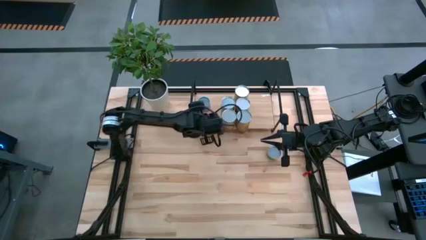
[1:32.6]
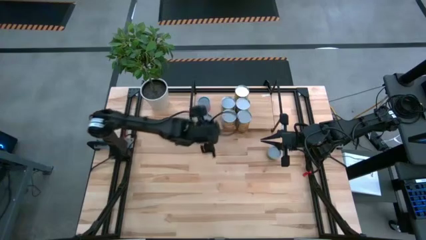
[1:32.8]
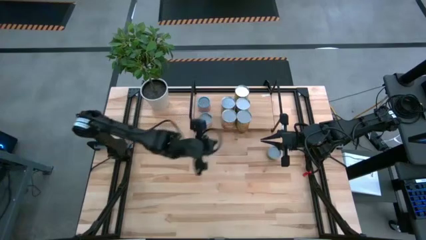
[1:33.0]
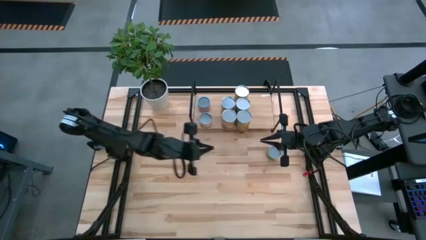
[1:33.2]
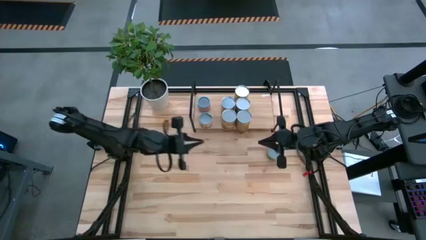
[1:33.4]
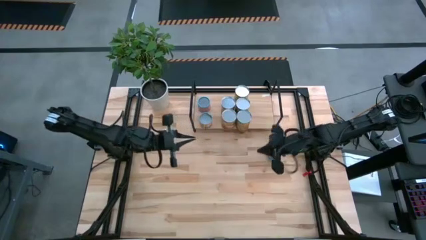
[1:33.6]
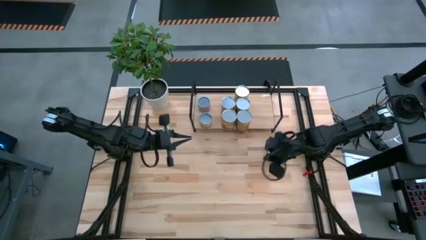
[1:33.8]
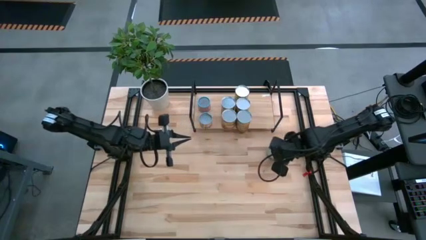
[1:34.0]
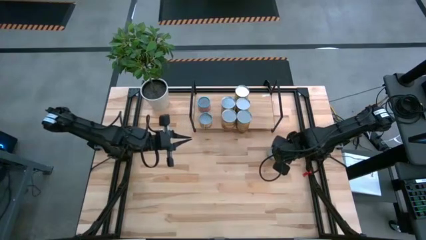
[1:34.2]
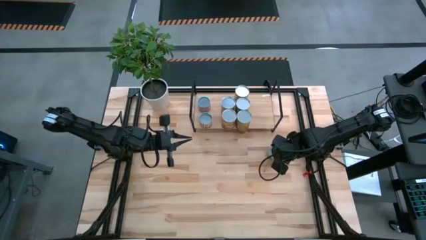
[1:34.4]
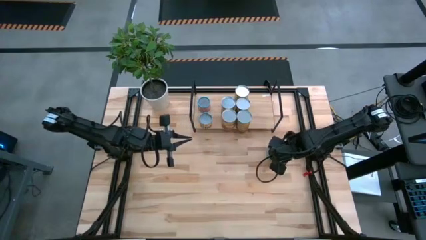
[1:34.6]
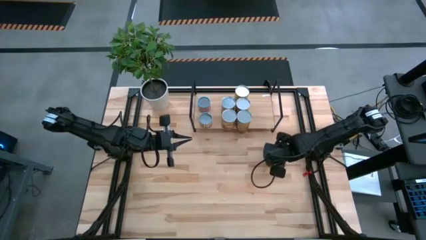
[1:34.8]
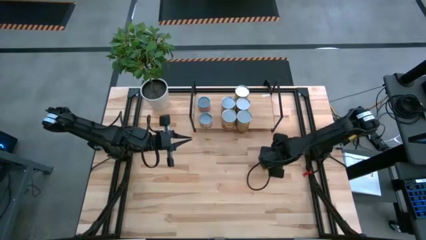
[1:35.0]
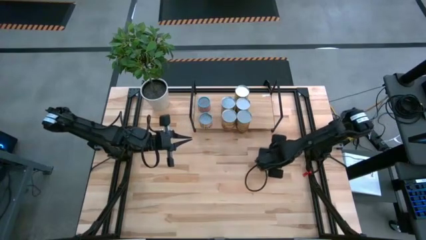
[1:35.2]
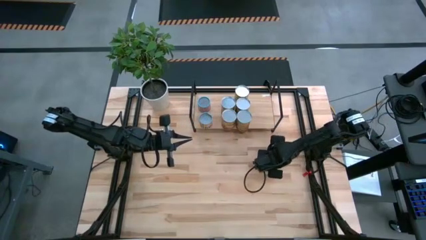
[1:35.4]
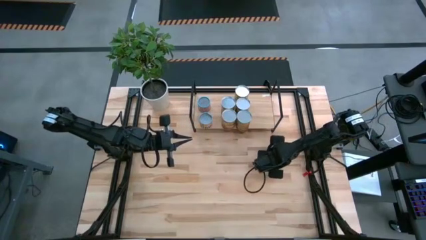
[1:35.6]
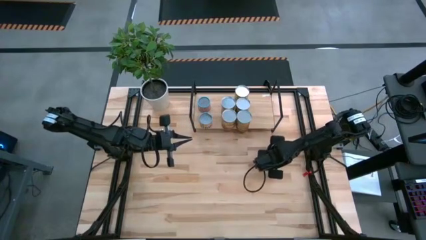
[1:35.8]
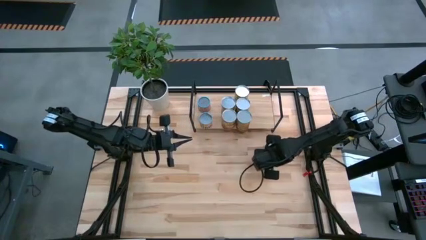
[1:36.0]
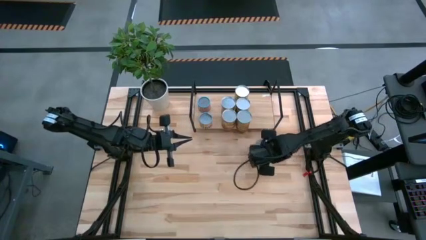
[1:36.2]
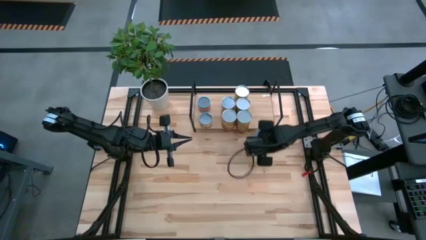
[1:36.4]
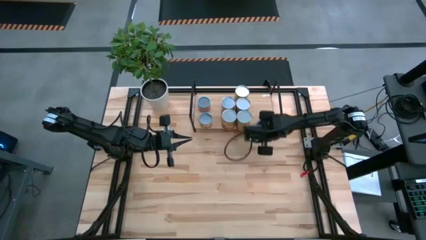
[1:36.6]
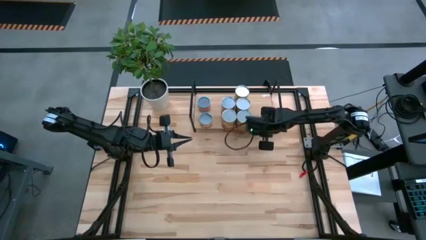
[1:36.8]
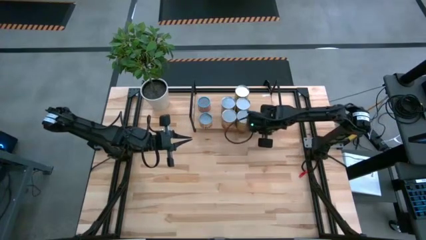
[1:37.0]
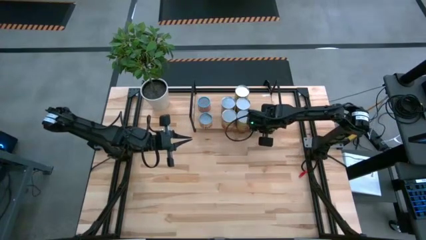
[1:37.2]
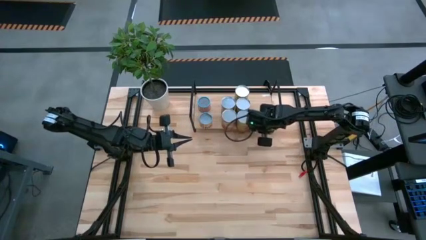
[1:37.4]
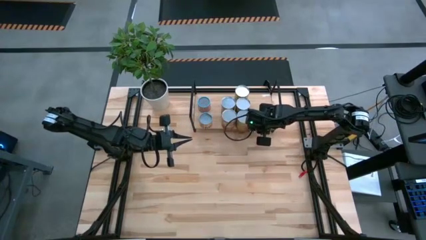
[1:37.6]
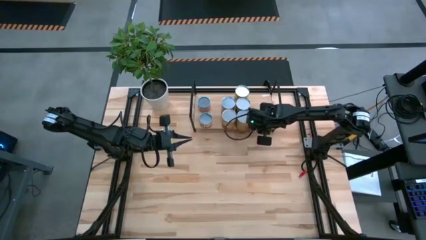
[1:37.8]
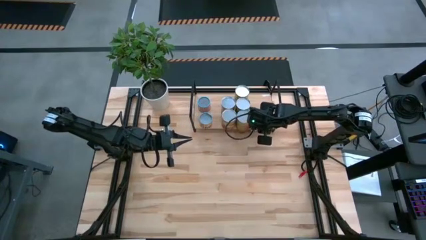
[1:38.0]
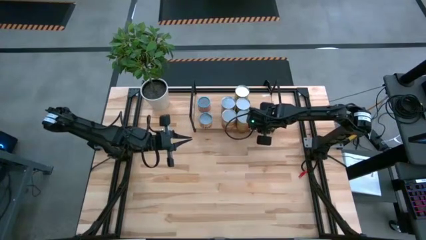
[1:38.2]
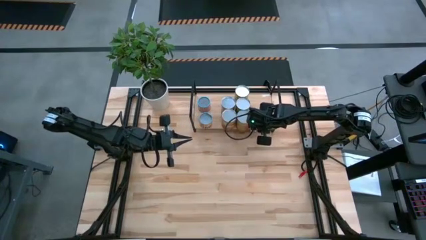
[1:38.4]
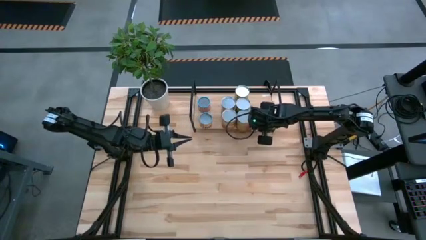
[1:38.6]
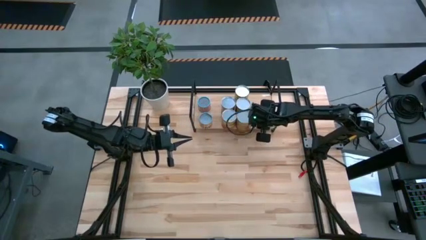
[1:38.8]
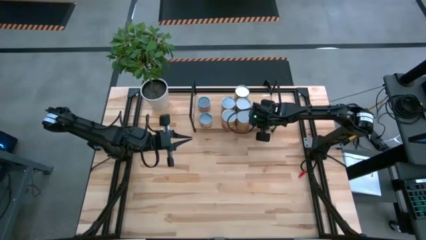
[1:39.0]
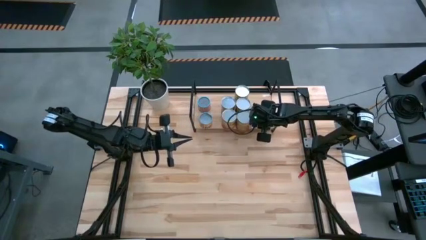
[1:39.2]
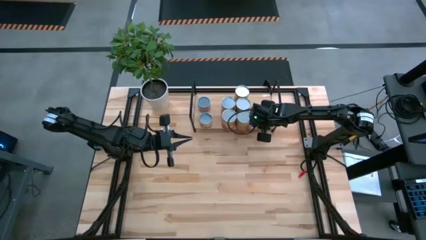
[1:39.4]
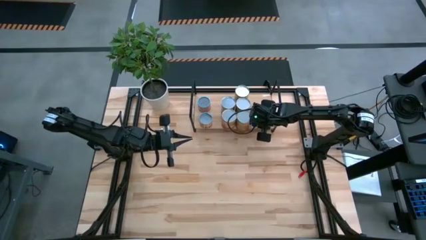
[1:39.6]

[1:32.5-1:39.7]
Task: Pick and place cans onto a shelf
Put the canned mushroom on the shelf

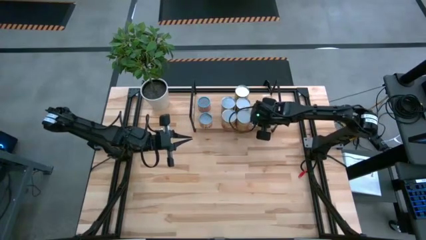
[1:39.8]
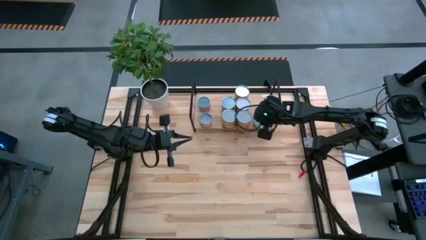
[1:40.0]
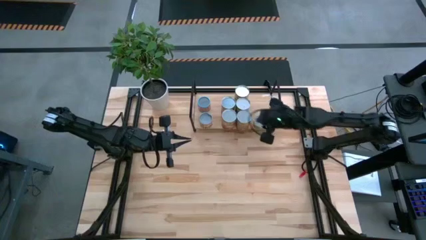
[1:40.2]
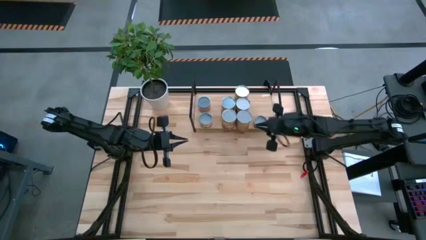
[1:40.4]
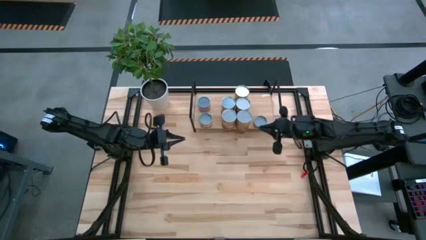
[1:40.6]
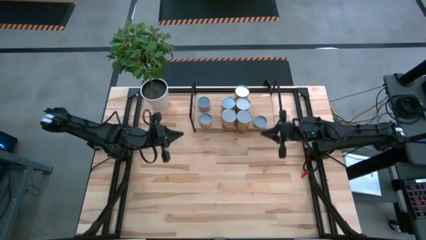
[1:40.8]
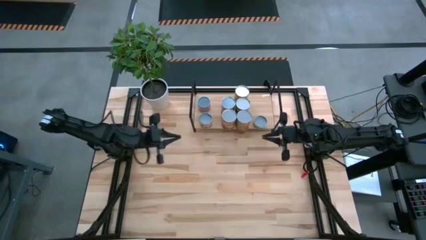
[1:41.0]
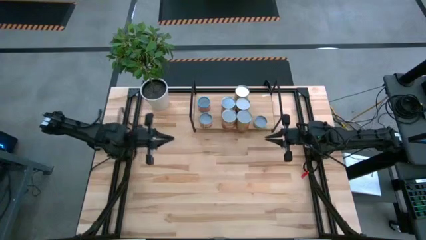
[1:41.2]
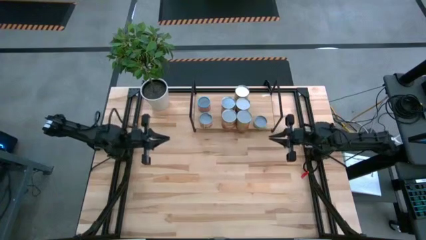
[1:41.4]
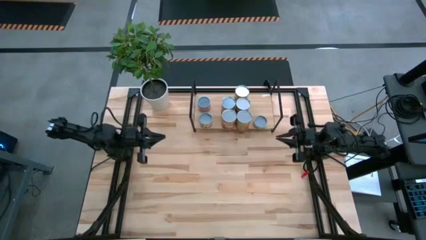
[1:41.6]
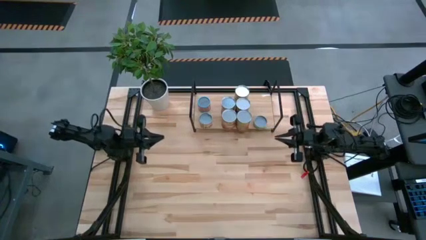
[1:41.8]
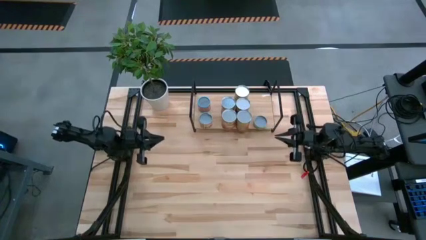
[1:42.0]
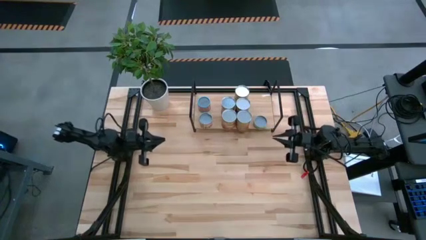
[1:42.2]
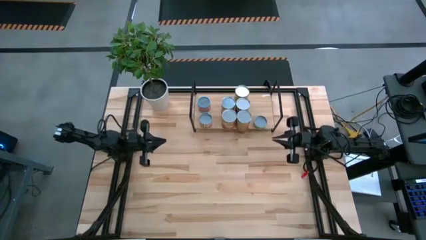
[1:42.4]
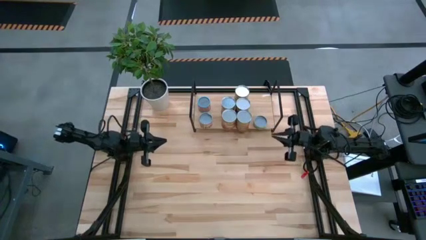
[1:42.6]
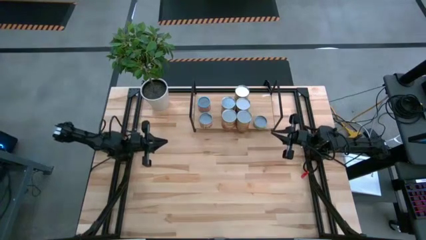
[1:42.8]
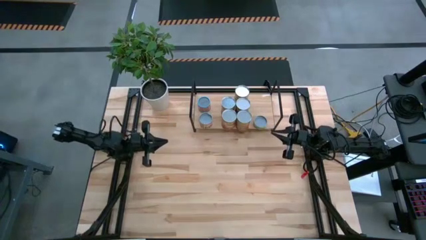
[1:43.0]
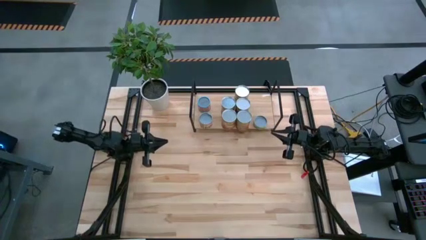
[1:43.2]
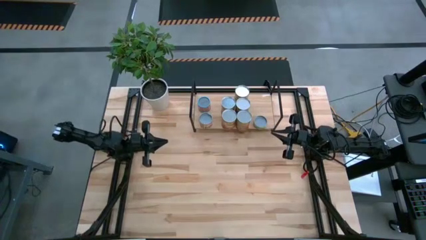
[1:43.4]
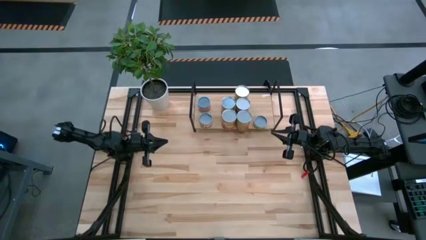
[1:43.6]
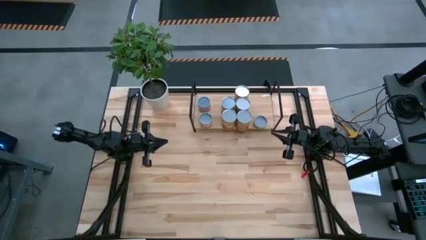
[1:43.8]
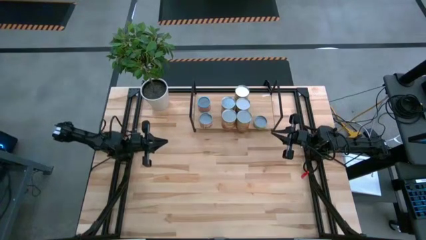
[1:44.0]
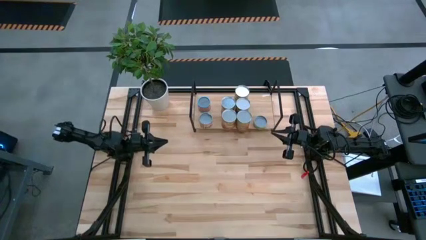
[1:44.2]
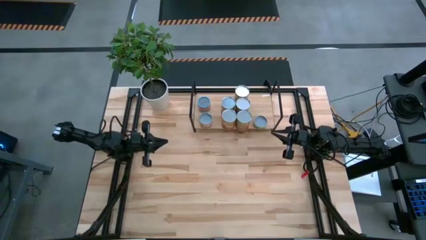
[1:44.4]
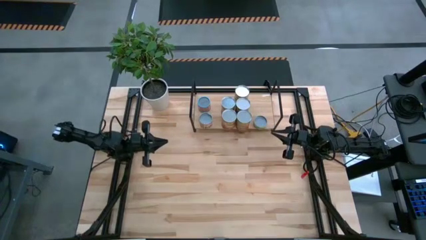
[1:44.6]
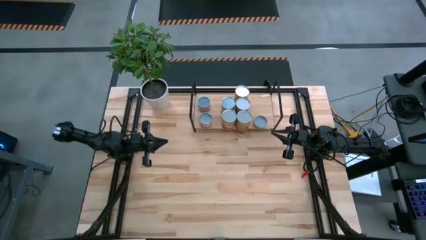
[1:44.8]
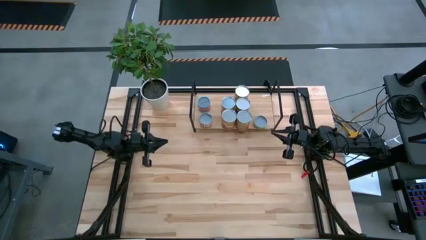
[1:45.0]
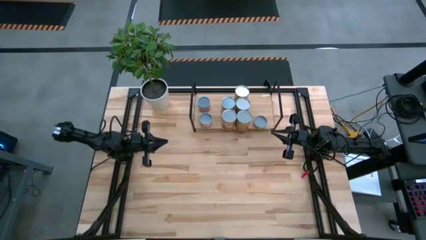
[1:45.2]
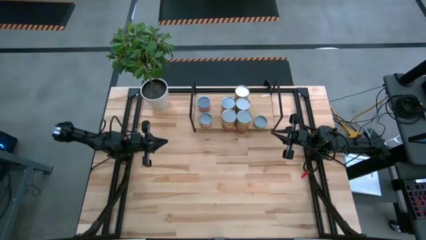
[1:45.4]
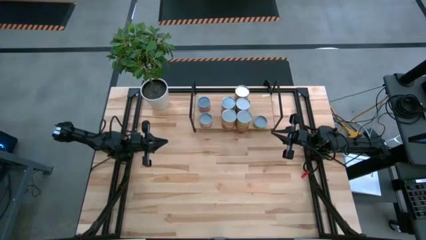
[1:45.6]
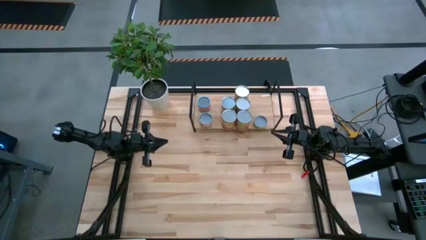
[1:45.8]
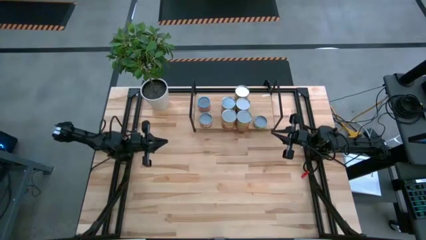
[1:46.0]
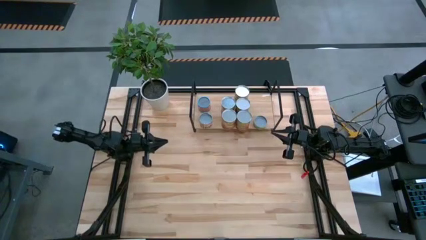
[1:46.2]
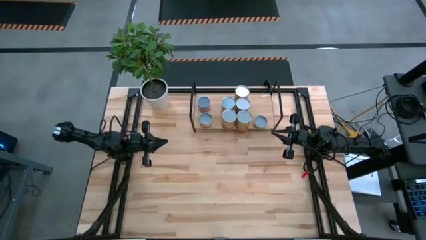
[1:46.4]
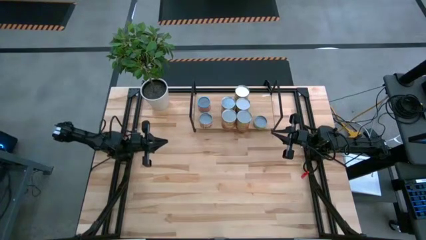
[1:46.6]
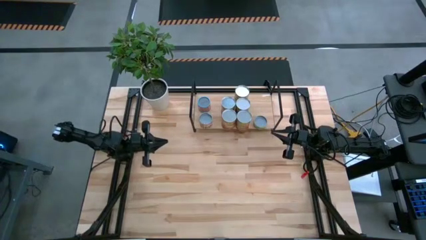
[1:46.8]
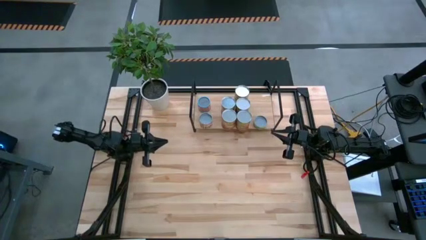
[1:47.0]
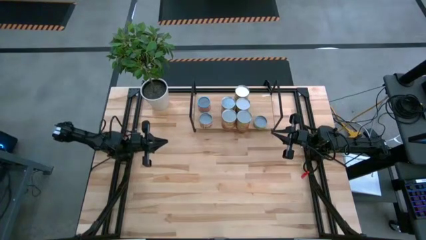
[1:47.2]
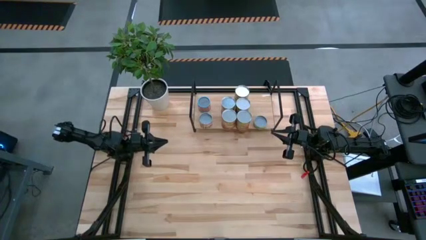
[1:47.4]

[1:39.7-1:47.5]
Return to Home Position
